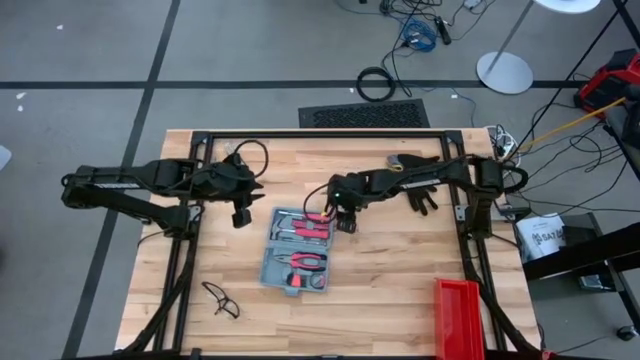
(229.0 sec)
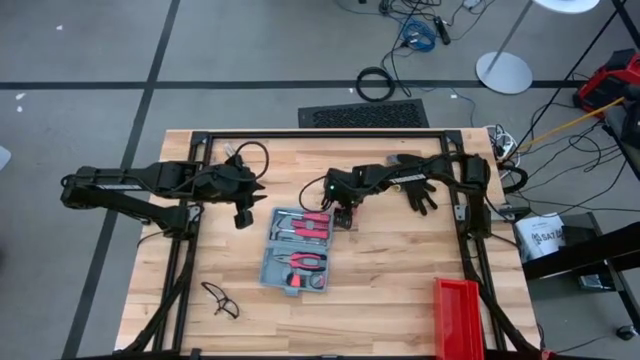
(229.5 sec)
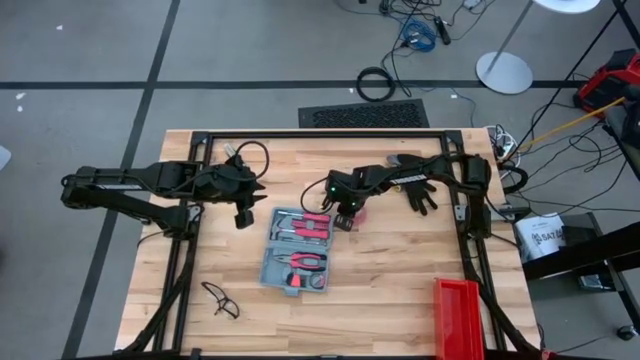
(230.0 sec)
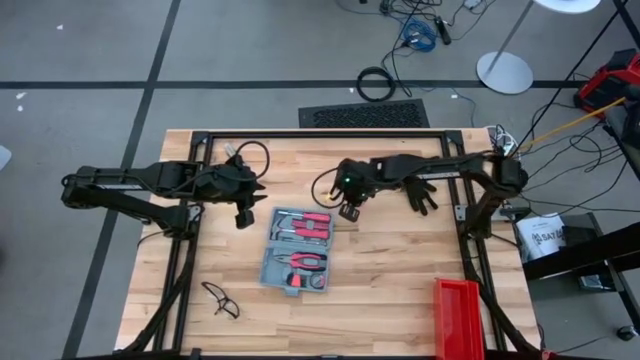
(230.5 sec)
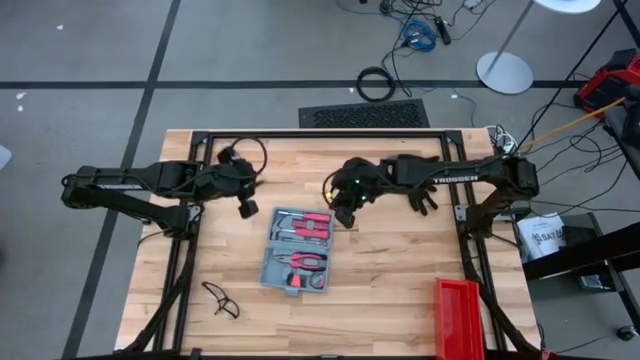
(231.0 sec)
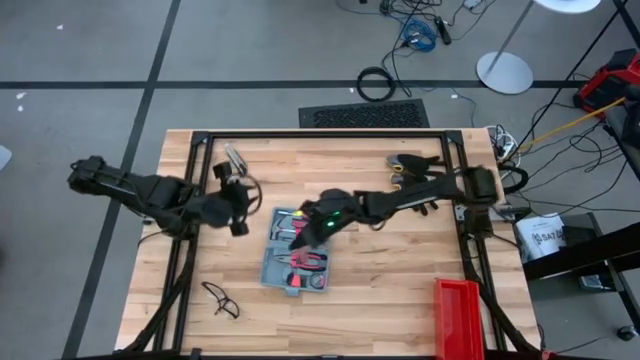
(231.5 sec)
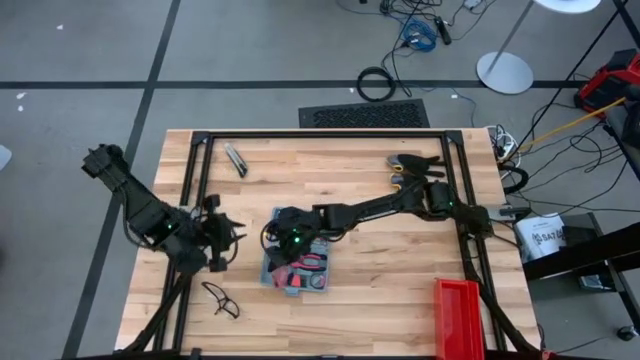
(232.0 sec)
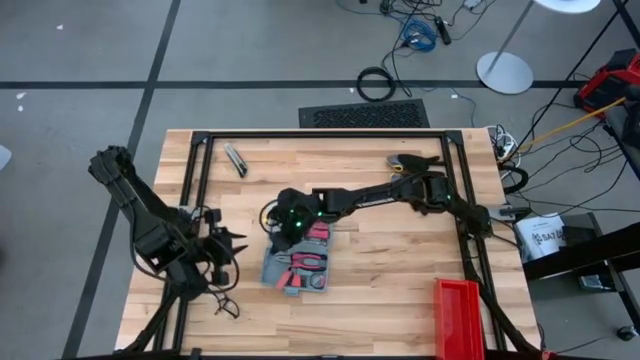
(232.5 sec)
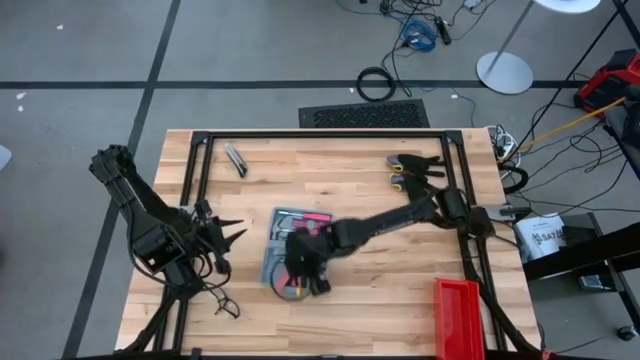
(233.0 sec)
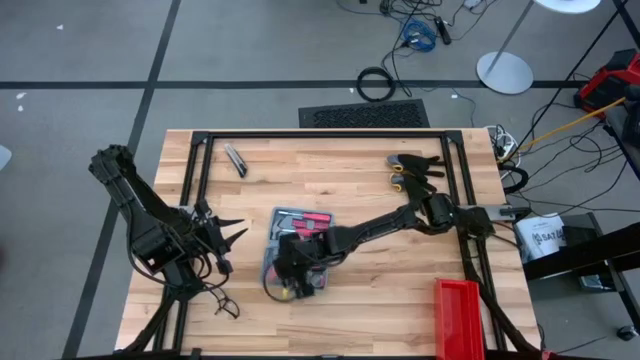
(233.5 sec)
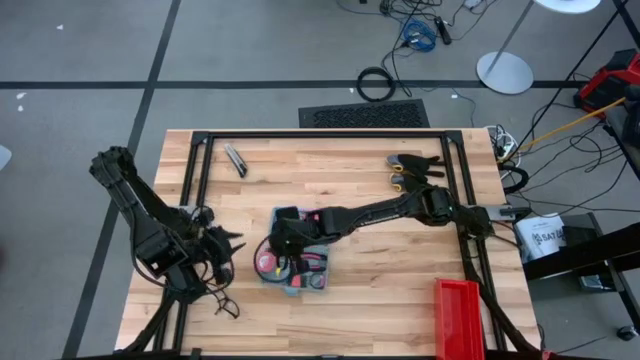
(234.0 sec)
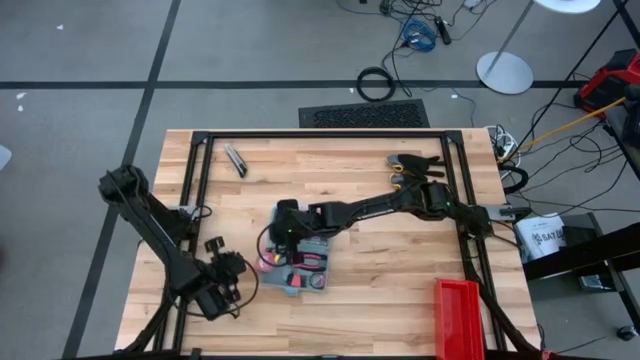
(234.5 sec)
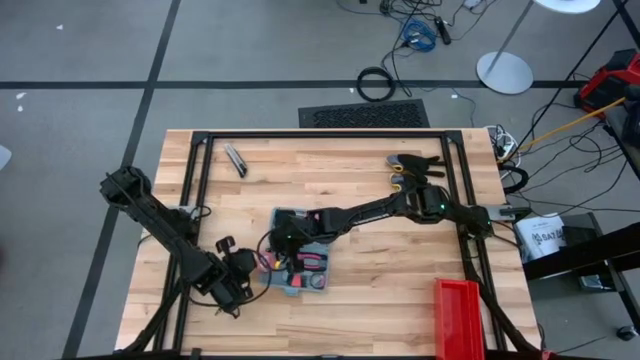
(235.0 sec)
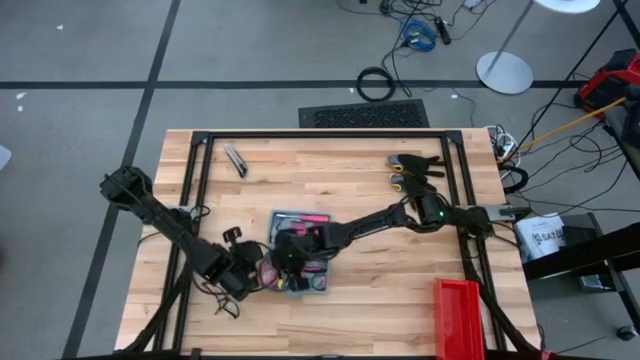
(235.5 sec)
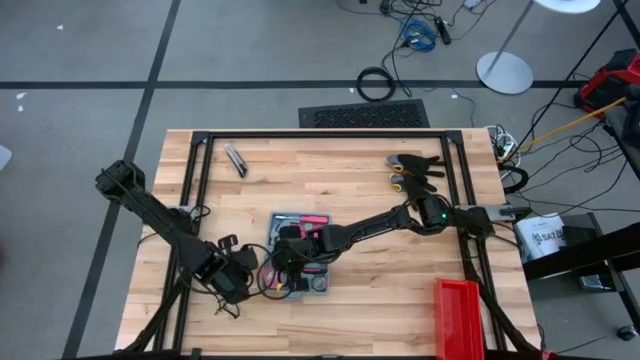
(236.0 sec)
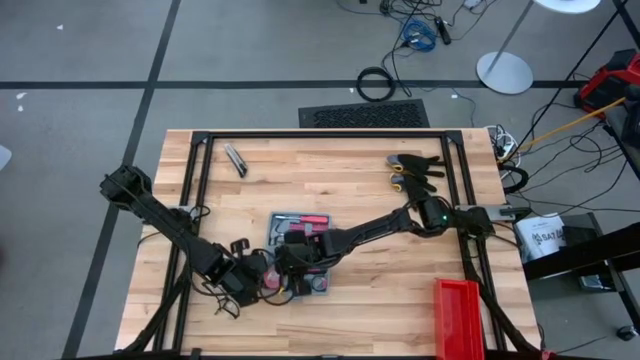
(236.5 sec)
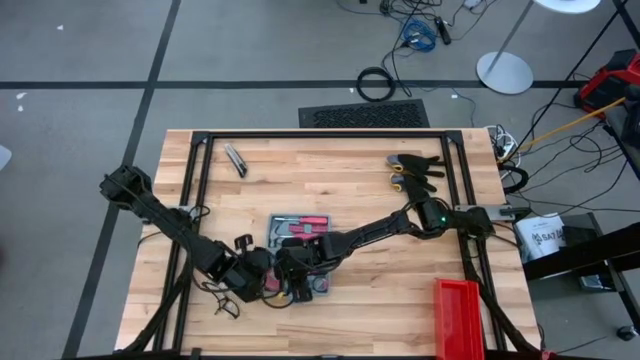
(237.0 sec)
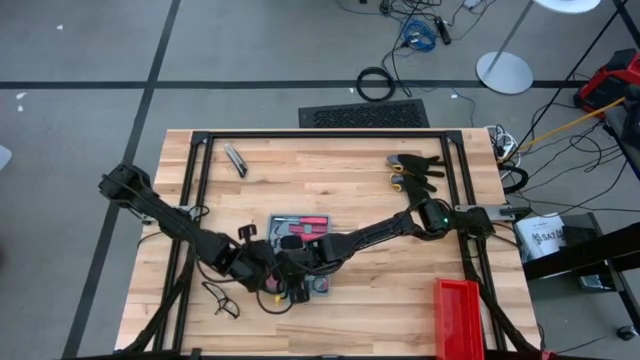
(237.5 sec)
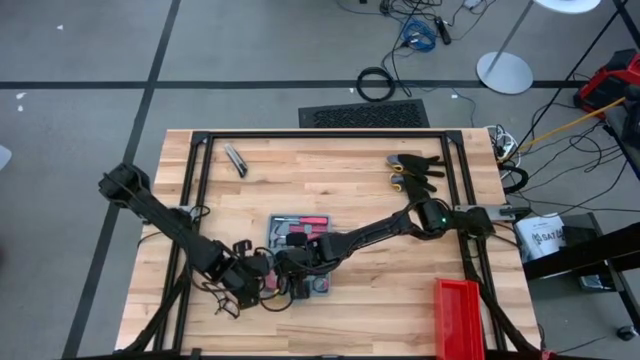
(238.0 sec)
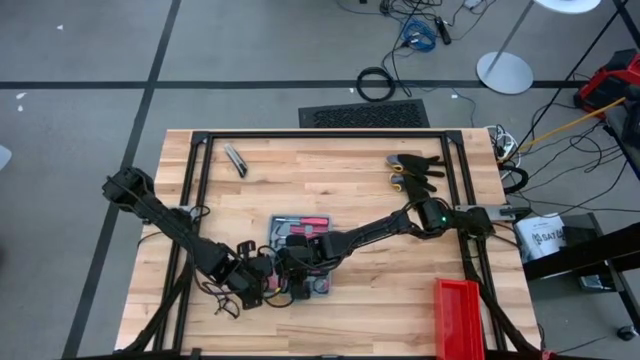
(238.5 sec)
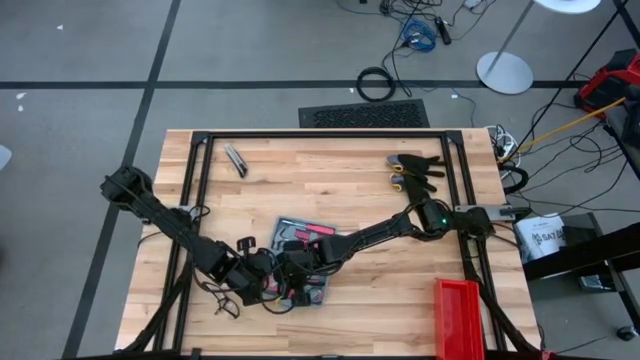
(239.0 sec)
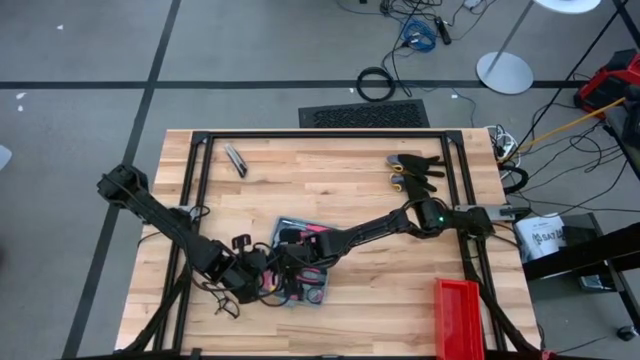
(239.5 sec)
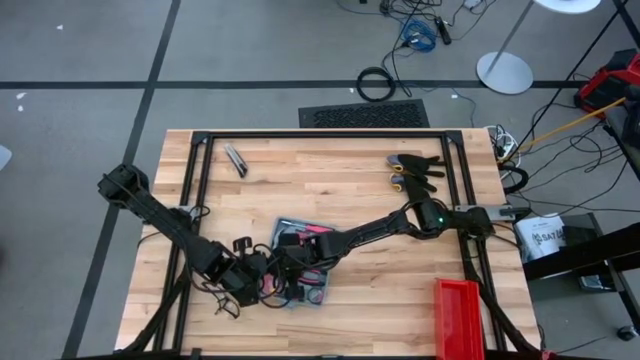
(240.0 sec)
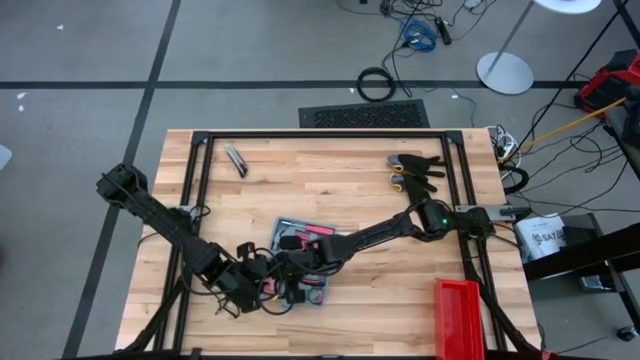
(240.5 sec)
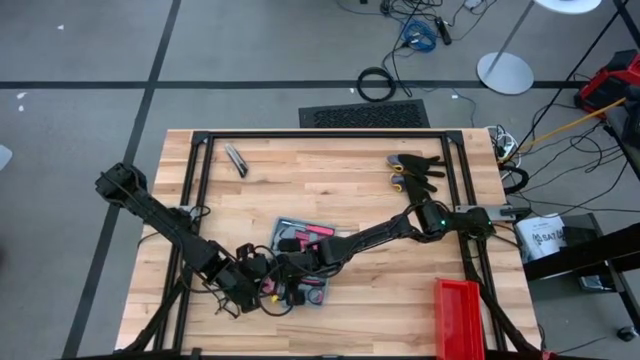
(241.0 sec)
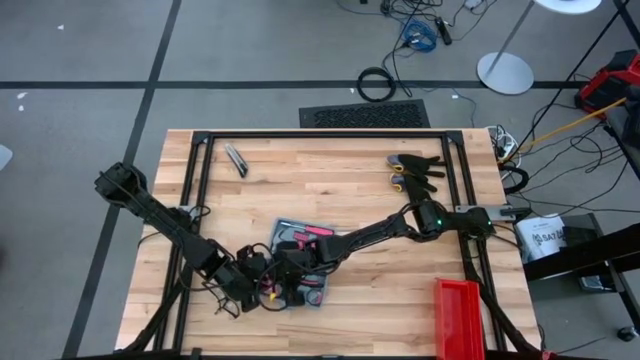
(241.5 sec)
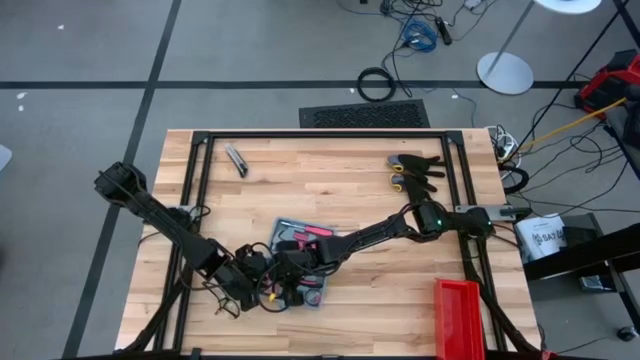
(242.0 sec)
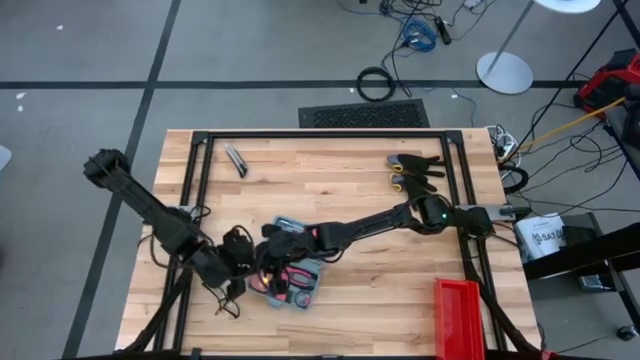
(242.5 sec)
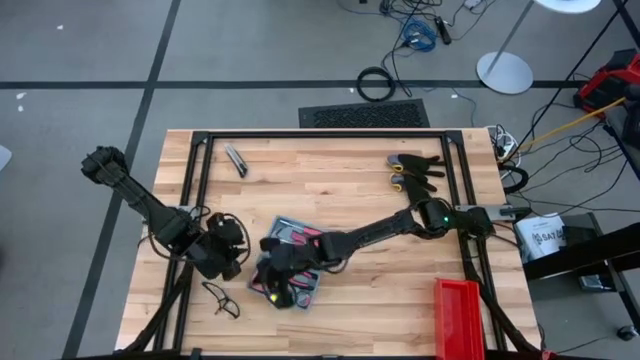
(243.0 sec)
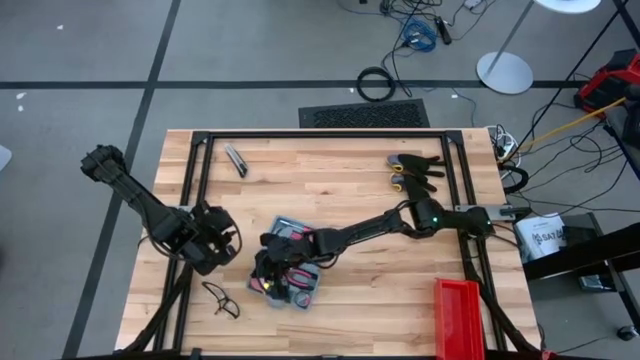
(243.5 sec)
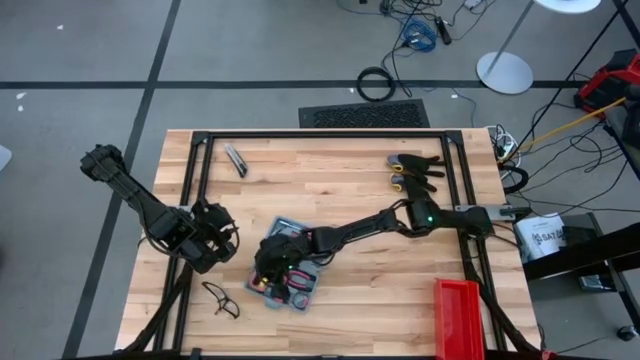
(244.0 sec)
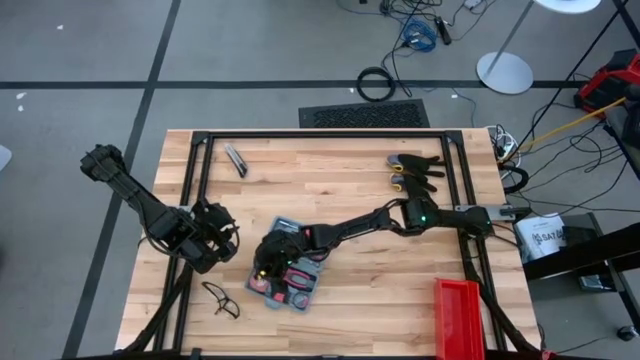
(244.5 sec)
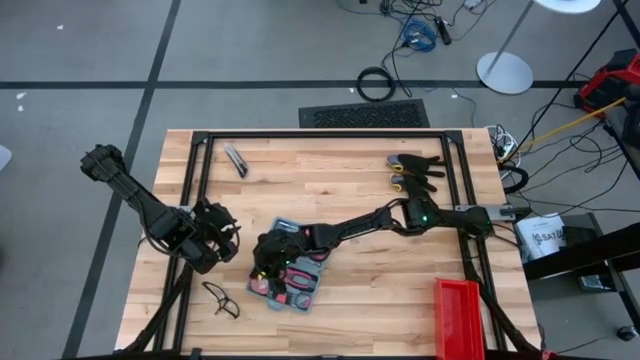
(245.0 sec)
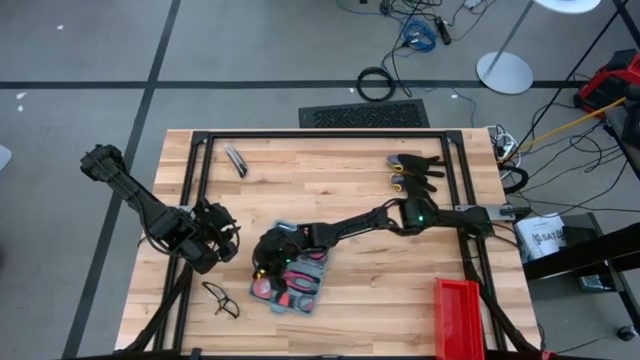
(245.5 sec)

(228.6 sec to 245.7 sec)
Task: prefit tool cases
Put the pink tape measure into the gray prefit tool case

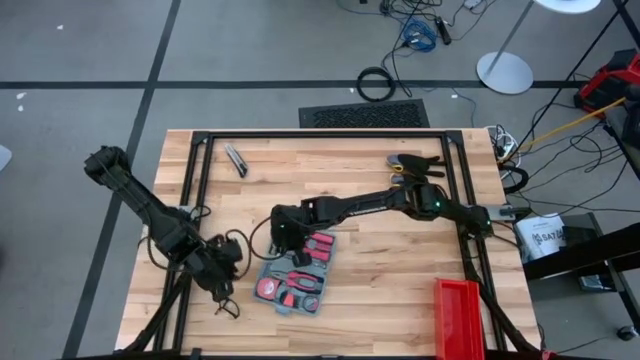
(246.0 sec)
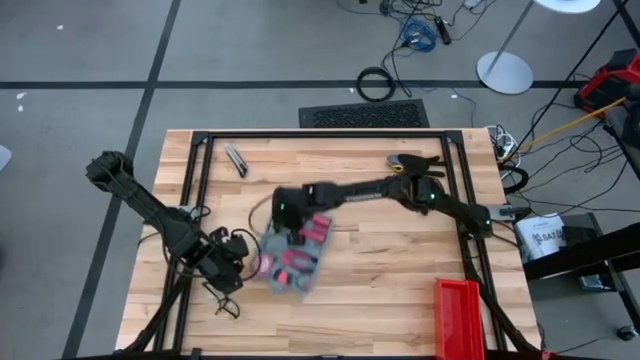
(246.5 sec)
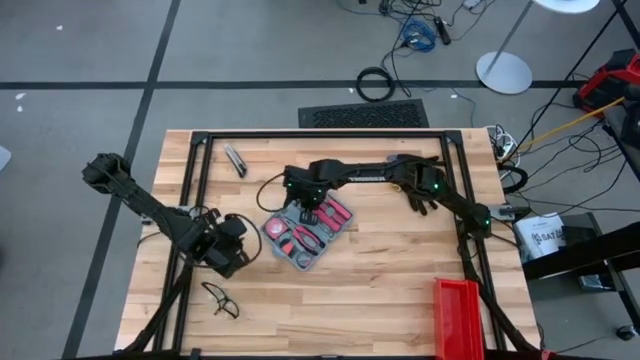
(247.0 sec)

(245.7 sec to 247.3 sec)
Move the gray prefit tool case to the center of the table

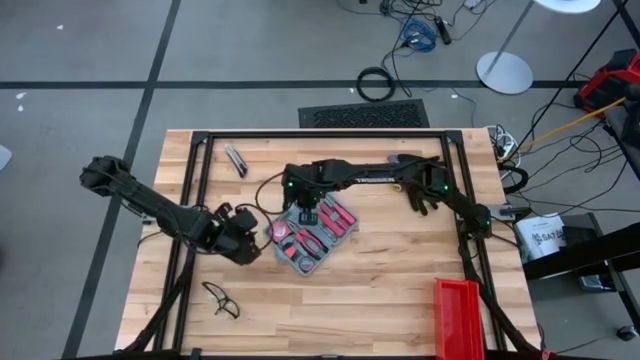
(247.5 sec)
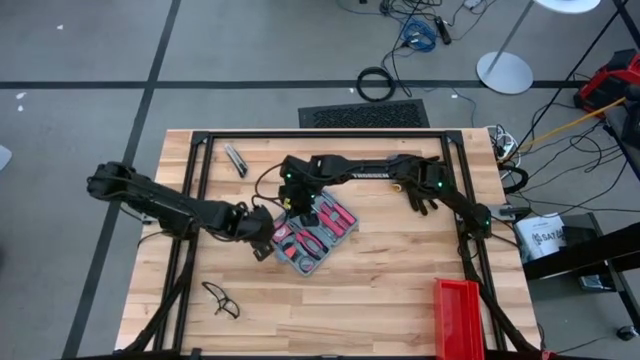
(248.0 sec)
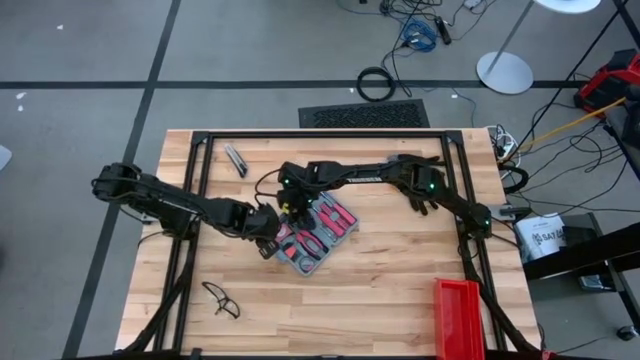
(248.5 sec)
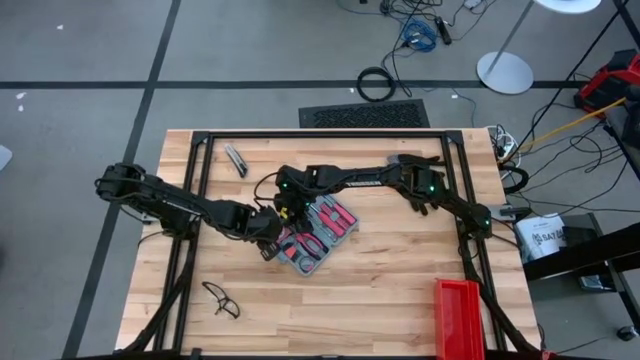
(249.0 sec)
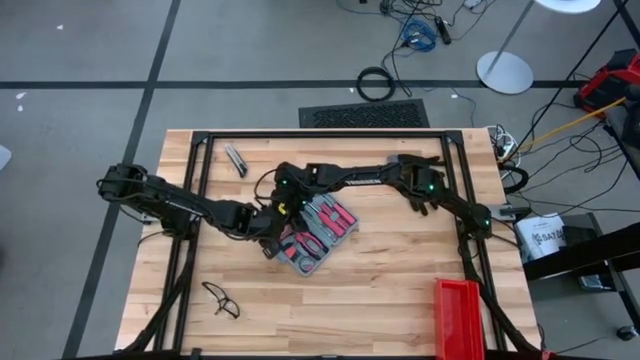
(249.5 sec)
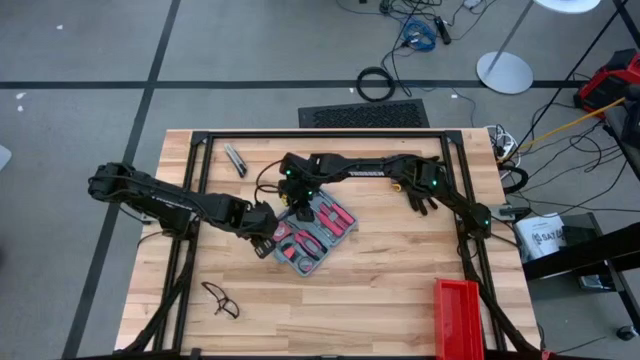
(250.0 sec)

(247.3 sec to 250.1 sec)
Adjust the pink tape measure
